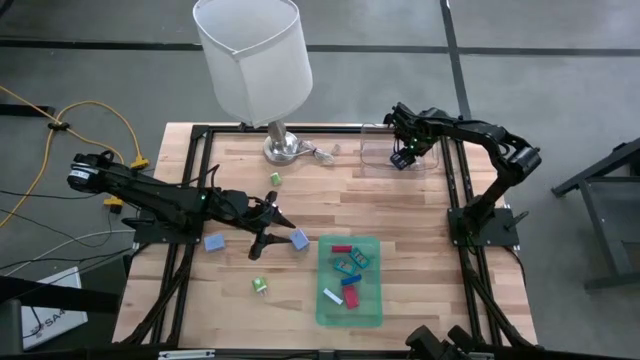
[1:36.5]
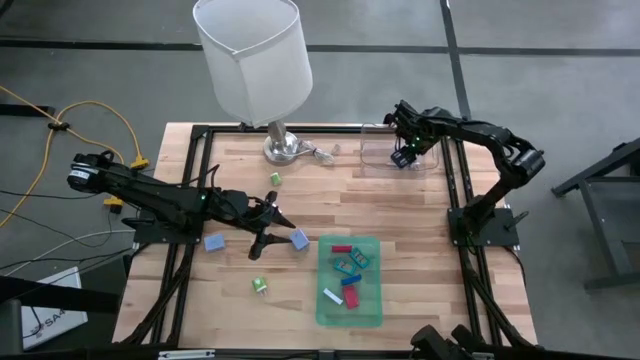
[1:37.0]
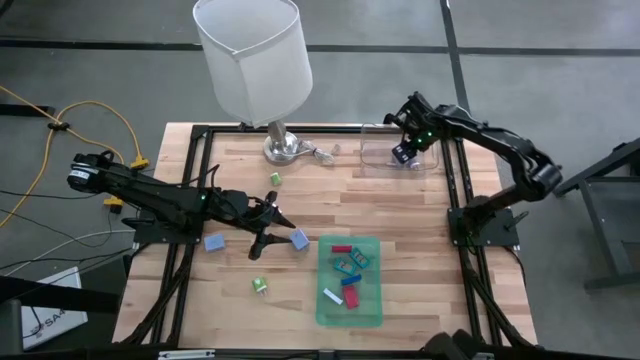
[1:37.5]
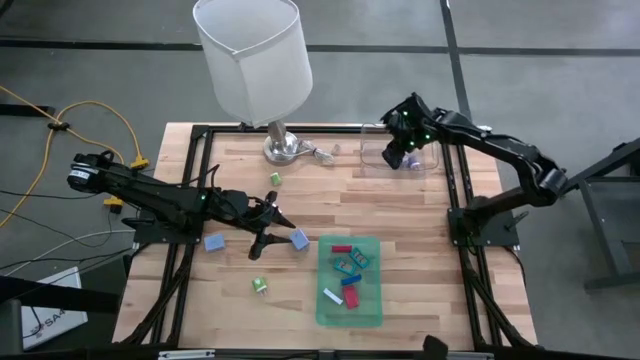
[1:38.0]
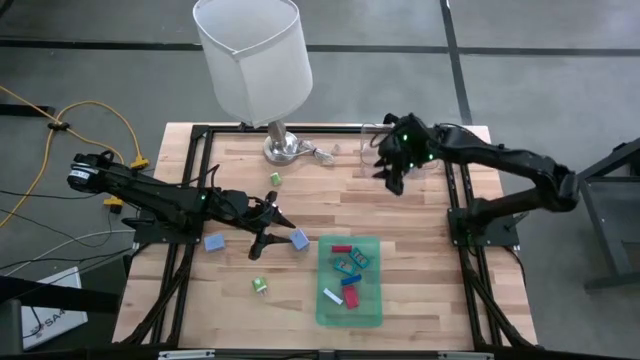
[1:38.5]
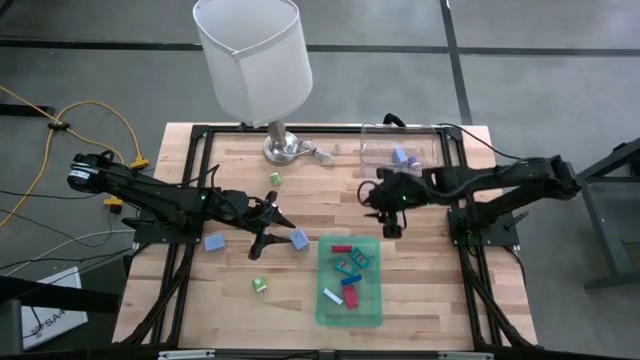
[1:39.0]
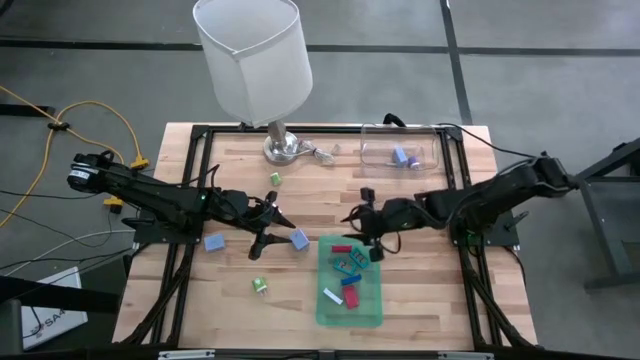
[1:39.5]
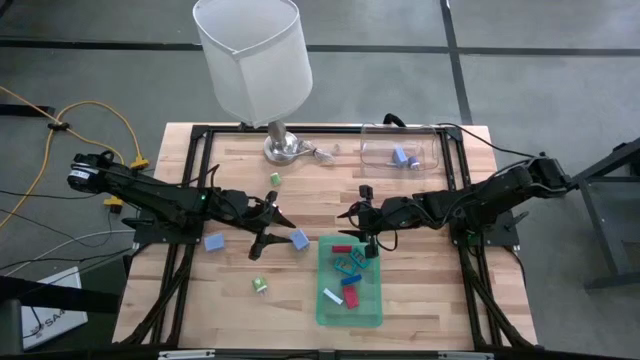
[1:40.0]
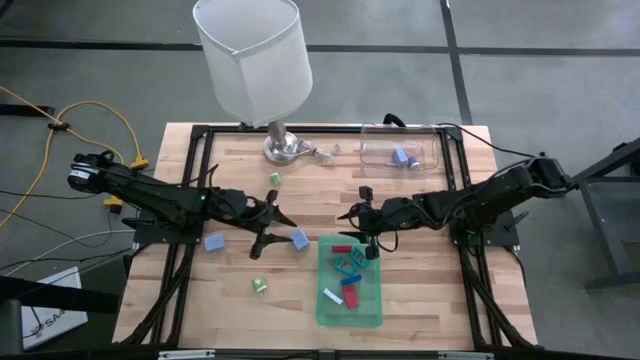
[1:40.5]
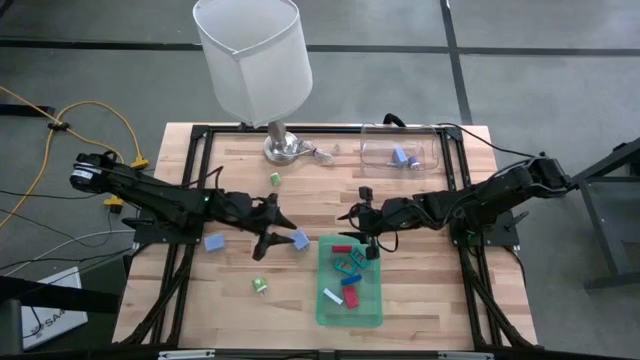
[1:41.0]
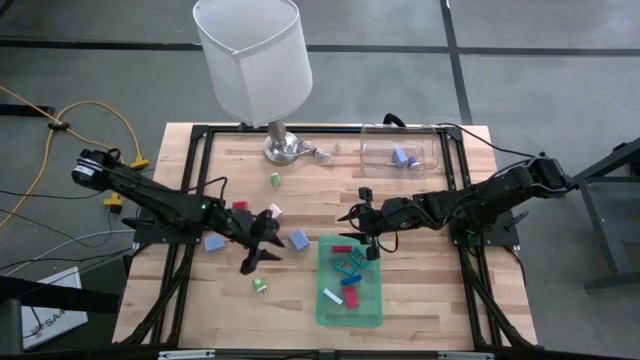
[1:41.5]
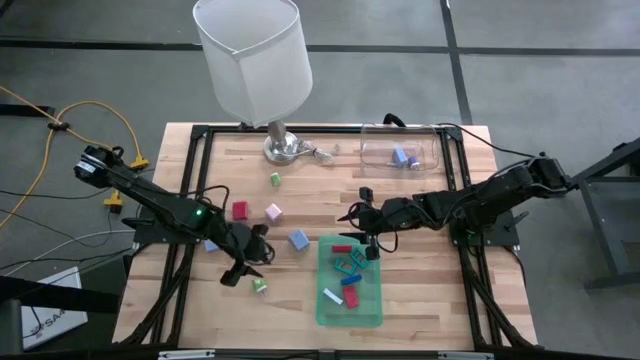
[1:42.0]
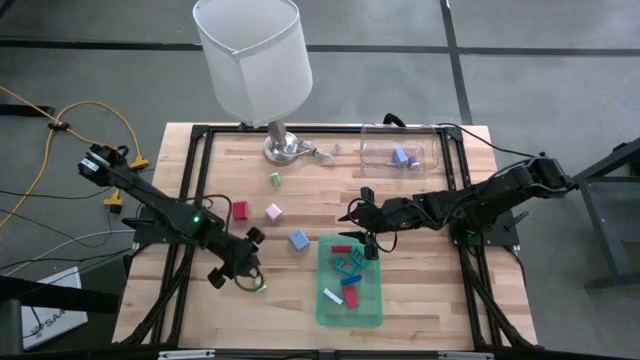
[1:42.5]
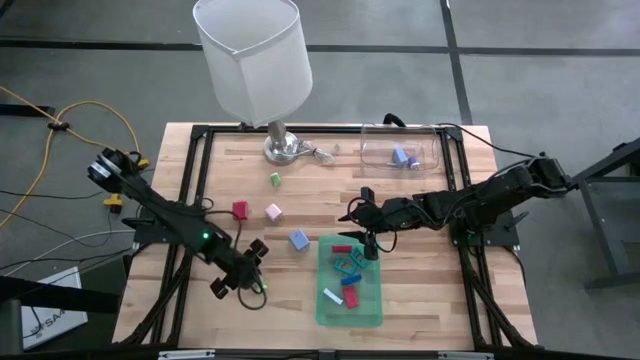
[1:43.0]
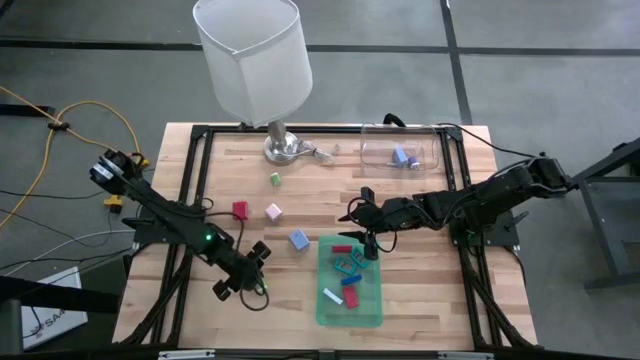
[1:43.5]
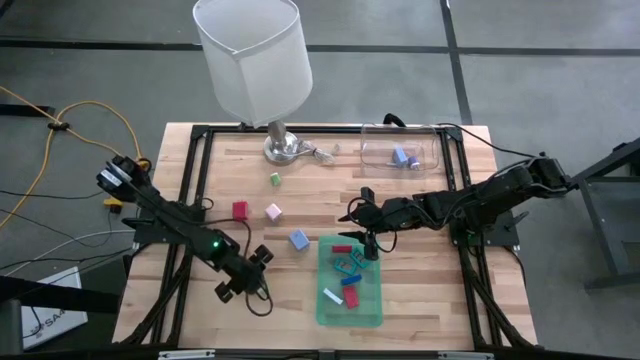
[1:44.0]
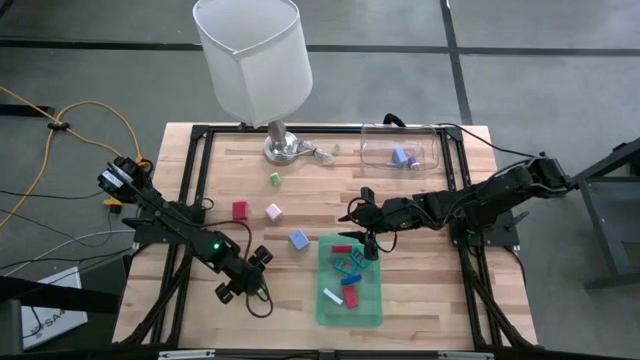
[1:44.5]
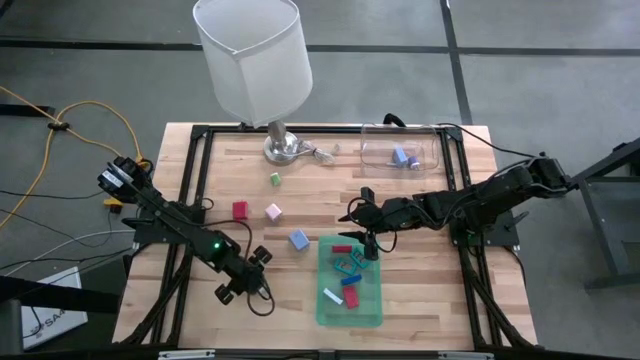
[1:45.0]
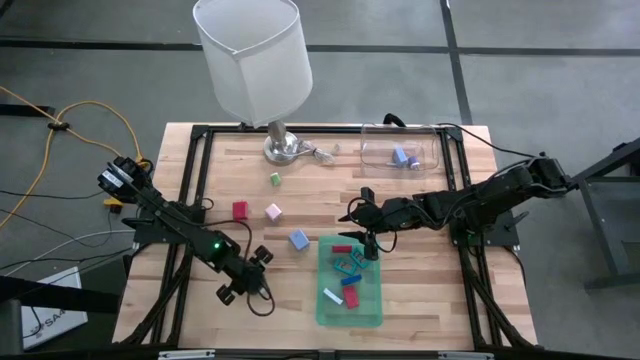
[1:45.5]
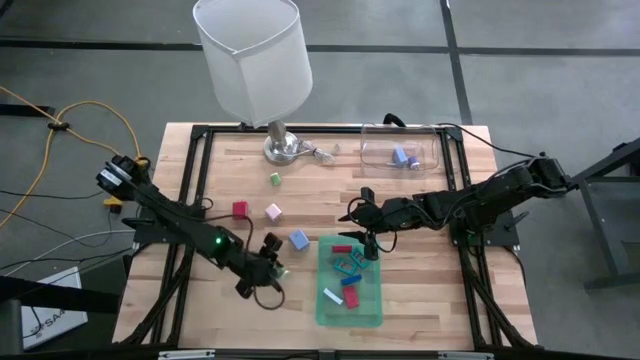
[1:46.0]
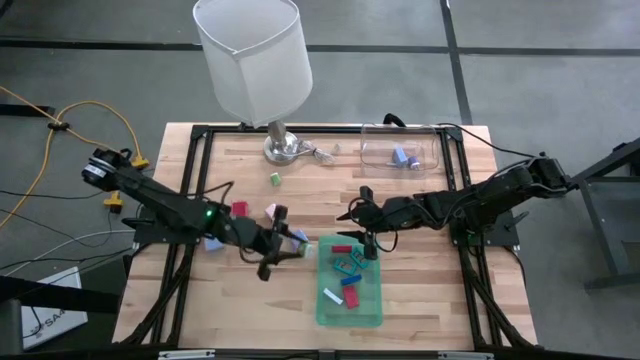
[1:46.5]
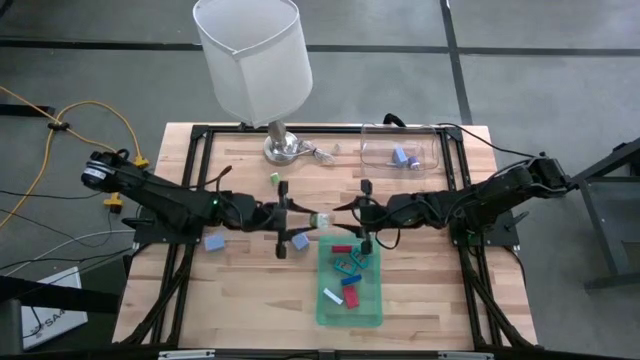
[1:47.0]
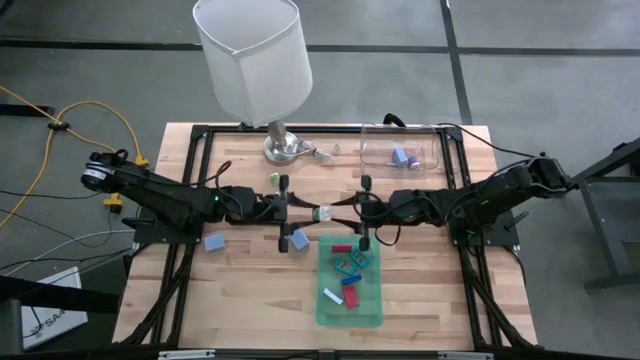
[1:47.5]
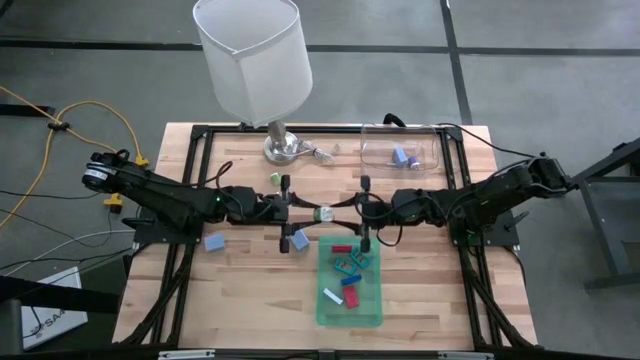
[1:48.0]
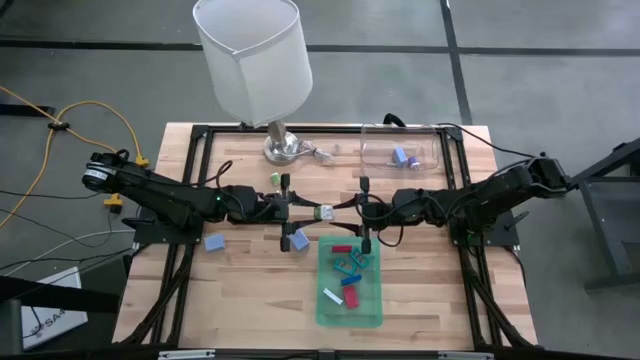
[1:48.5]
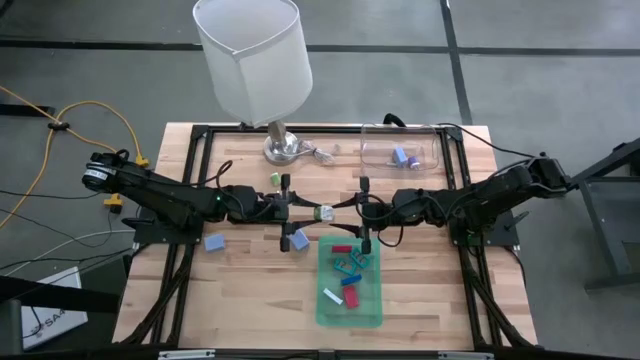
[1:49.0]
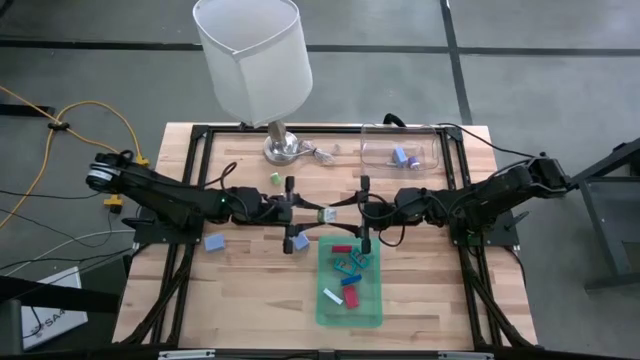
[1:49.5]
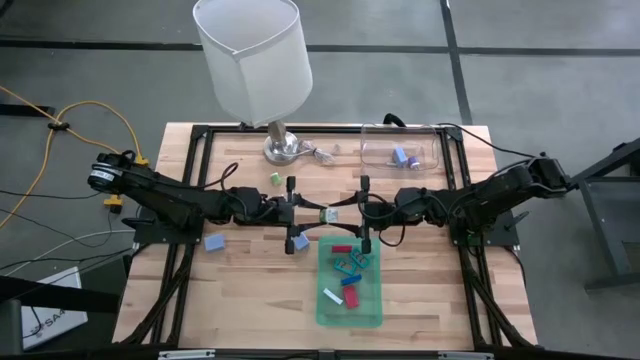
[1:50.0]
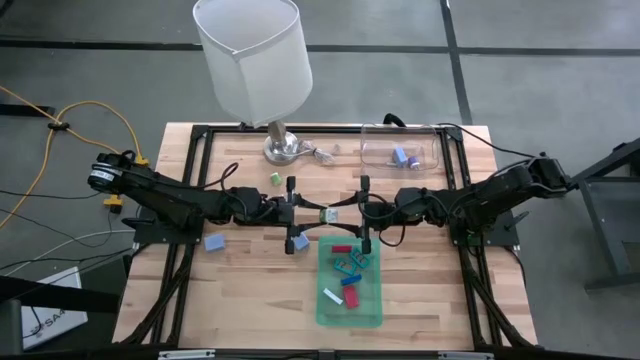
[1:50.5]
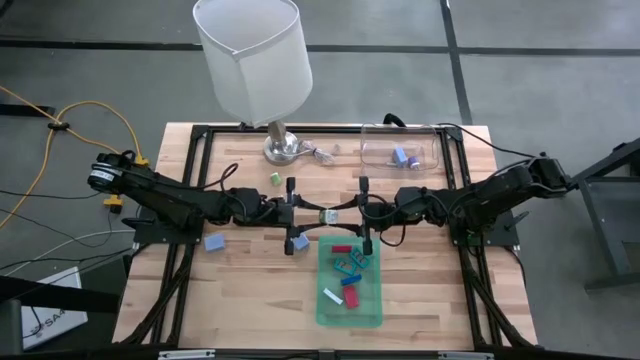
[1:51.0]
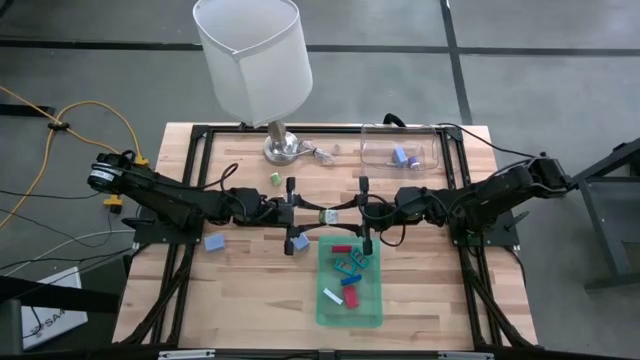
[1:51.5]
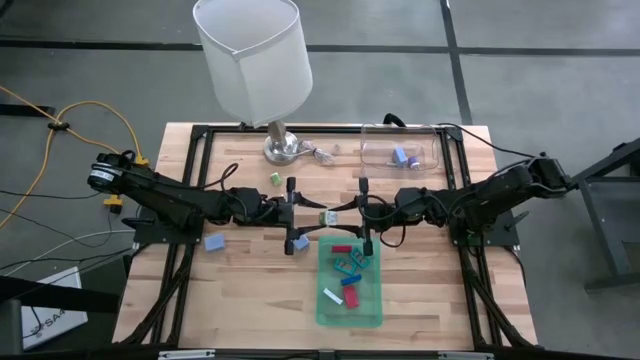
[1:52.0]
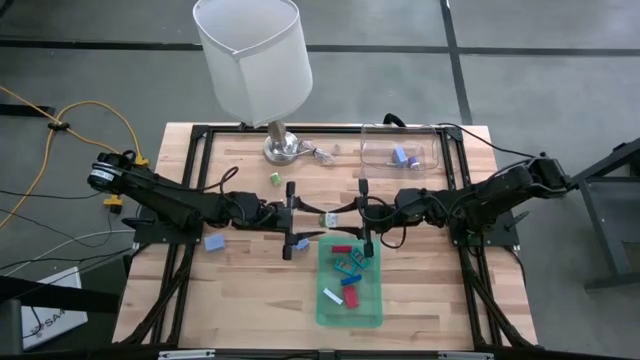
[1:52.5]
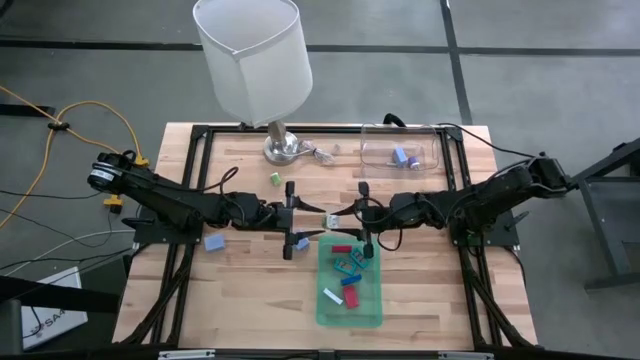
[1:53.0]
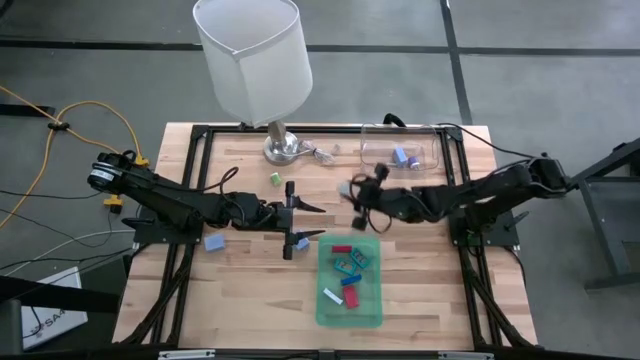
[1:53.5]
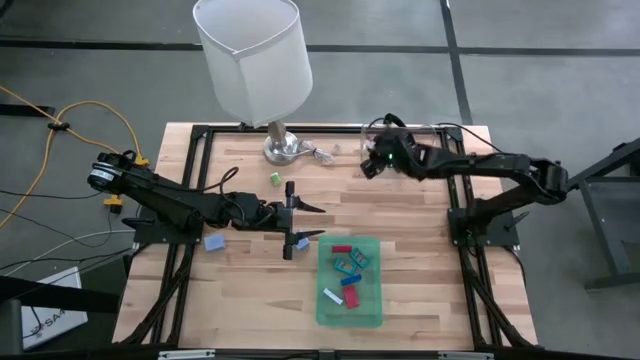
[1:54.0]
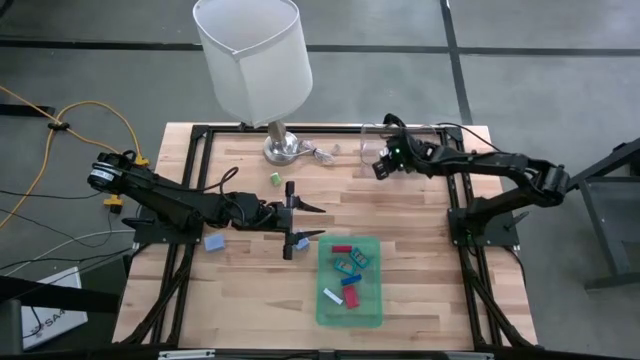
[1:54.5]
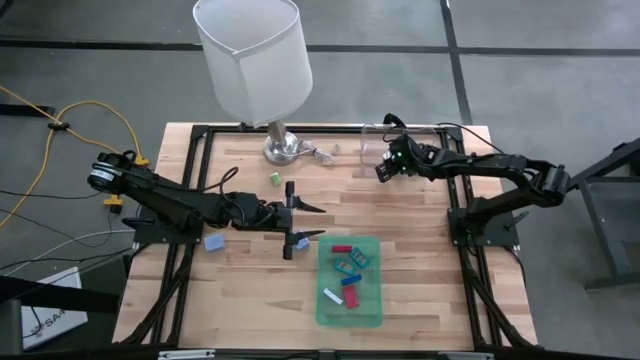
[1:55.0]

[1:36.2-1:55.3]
Task: Pick & Place Office items
Put the bottom green charger adapter into the transparent bin

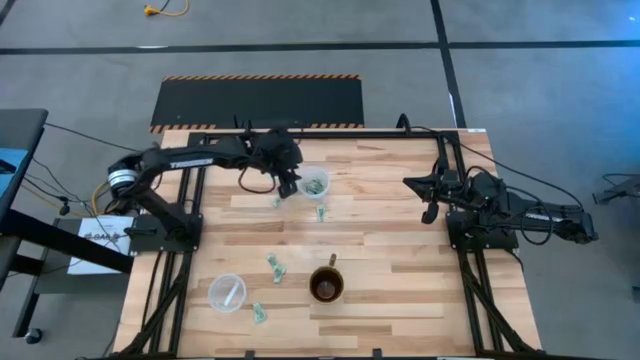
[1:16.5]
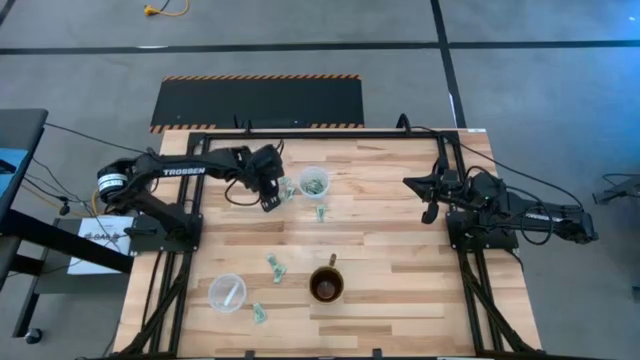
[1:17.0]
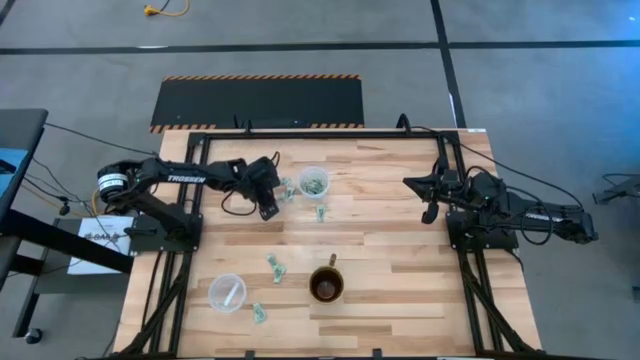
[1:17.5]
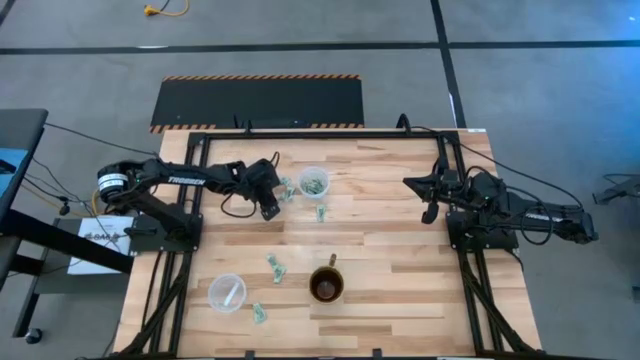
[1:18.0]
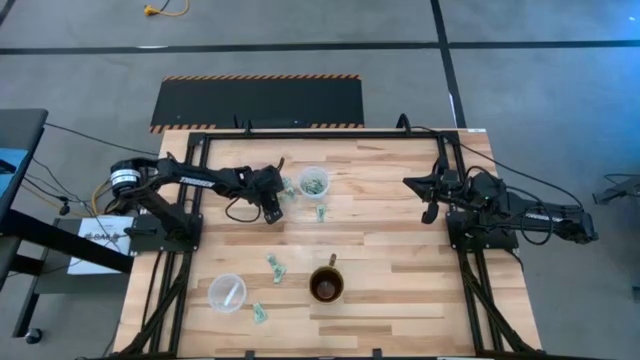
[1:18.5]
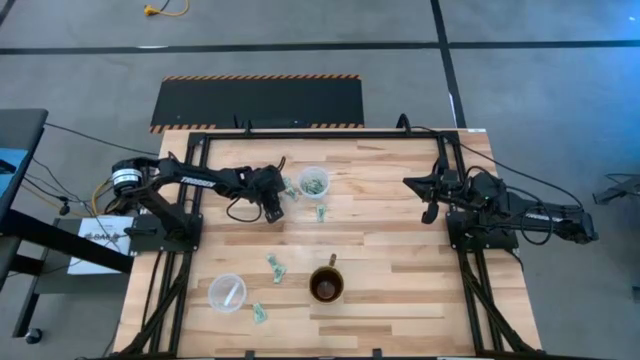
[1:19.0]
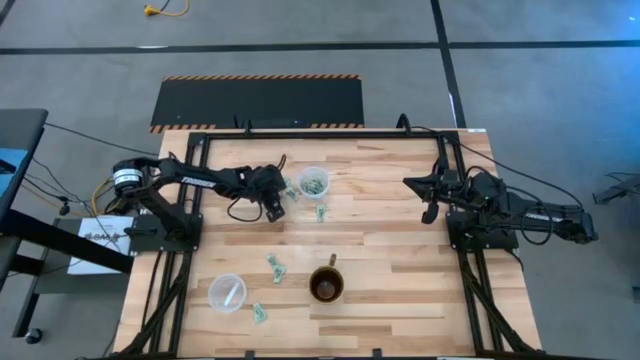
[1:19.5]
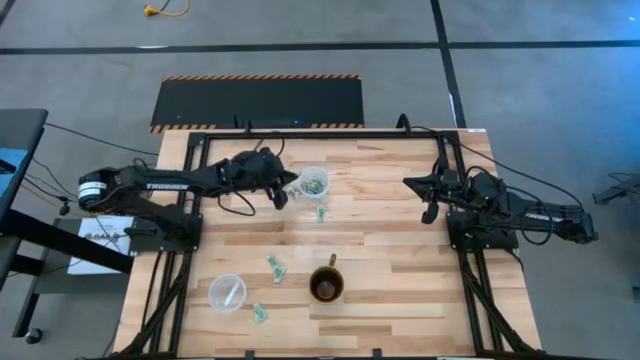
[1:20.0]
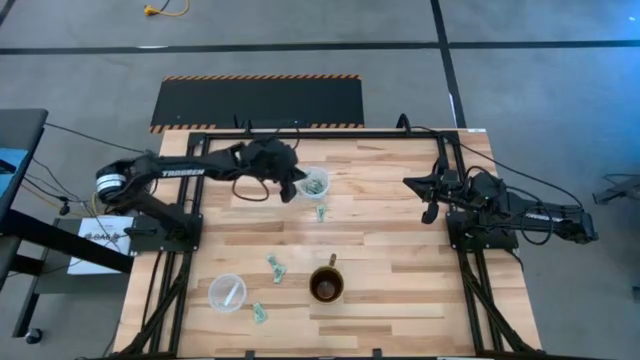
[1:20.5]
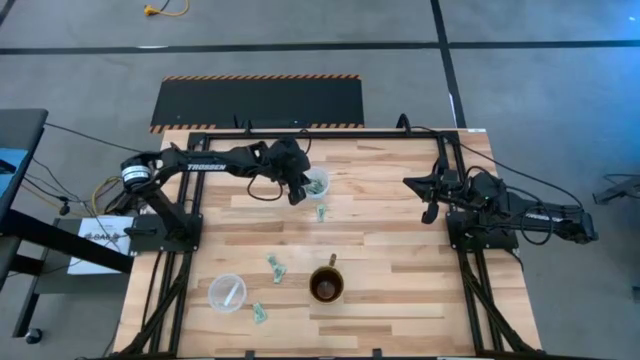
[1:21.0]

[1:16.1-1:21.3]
Task: Pick and place items into bin
Put the stevia packet into the top transparent bin
